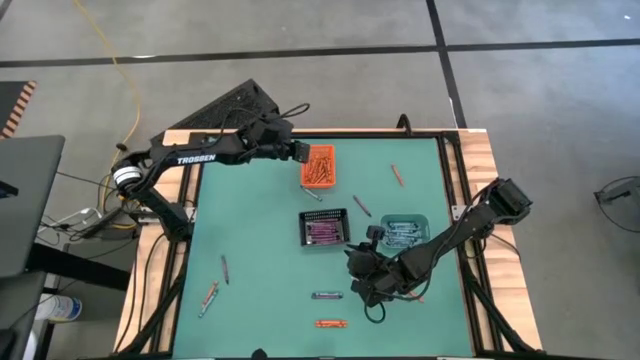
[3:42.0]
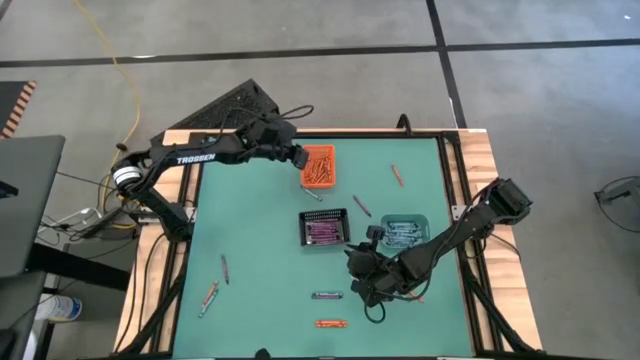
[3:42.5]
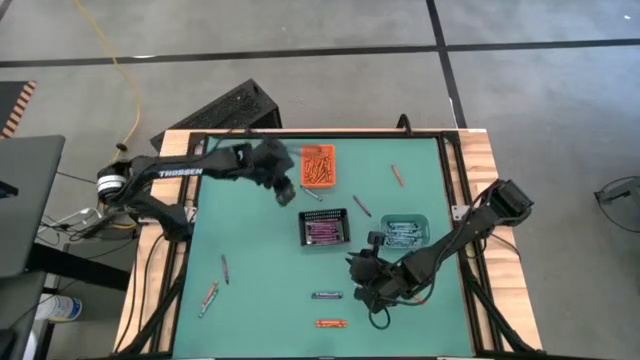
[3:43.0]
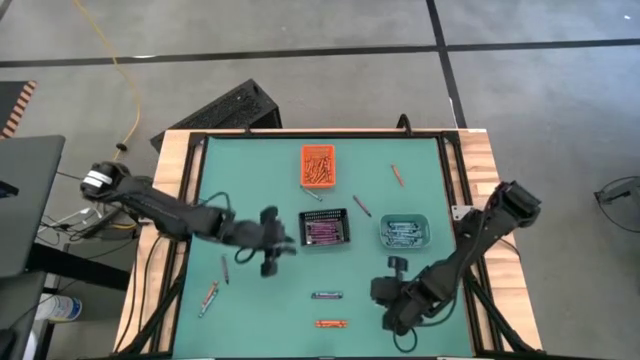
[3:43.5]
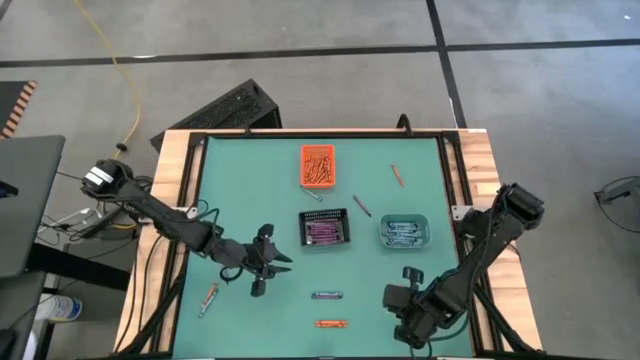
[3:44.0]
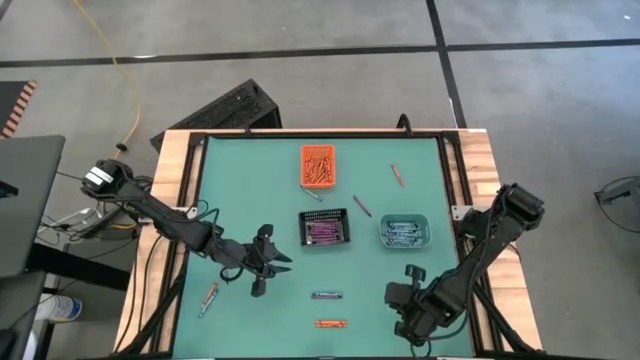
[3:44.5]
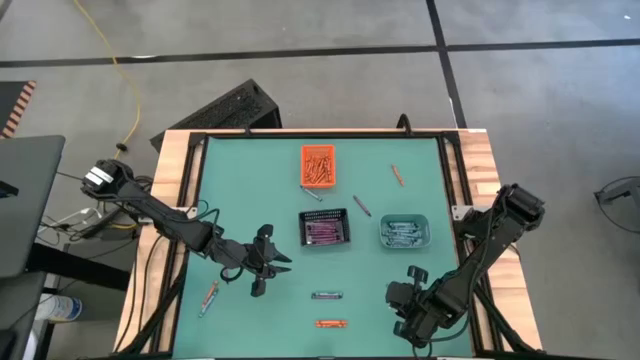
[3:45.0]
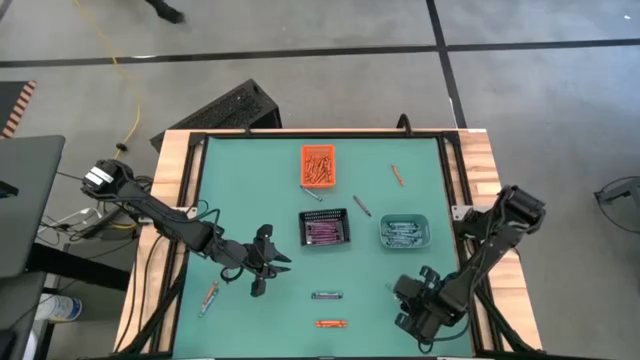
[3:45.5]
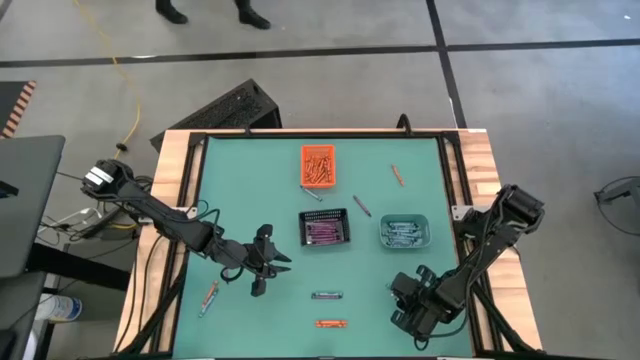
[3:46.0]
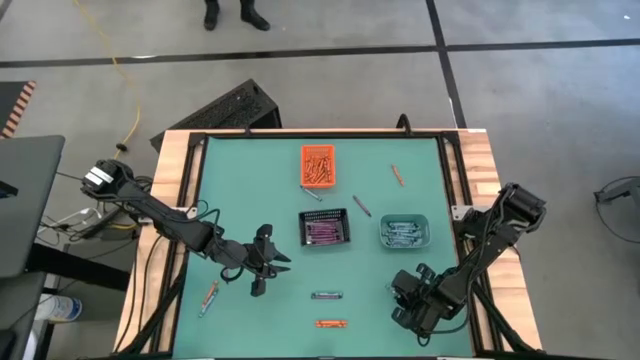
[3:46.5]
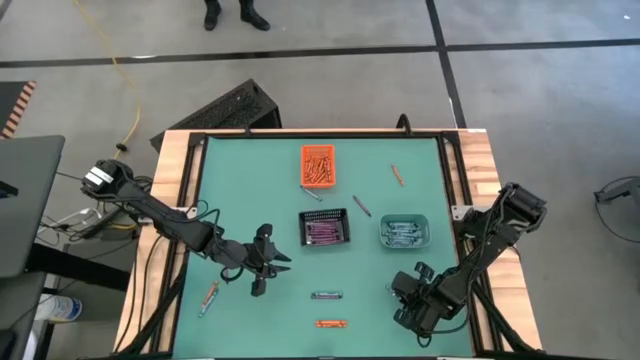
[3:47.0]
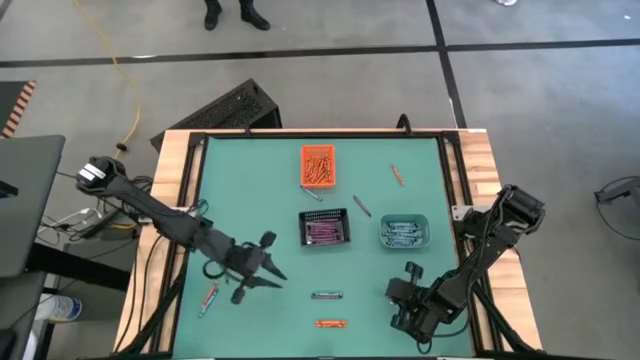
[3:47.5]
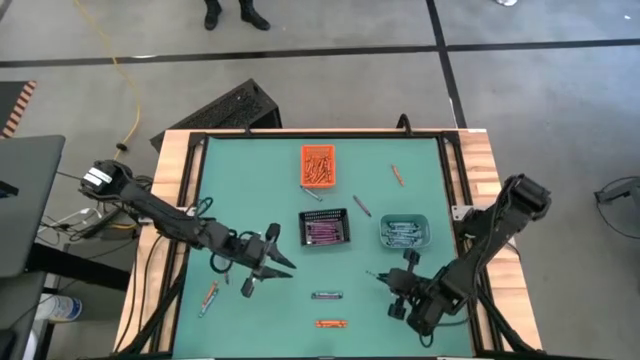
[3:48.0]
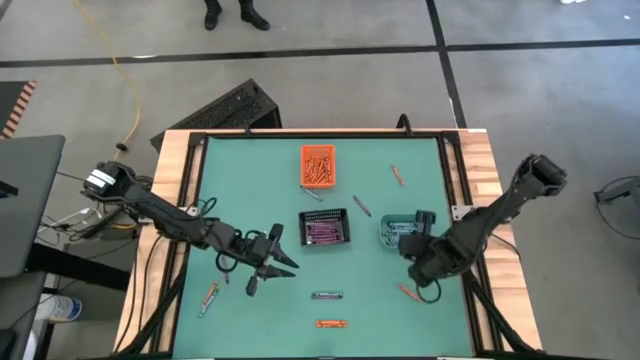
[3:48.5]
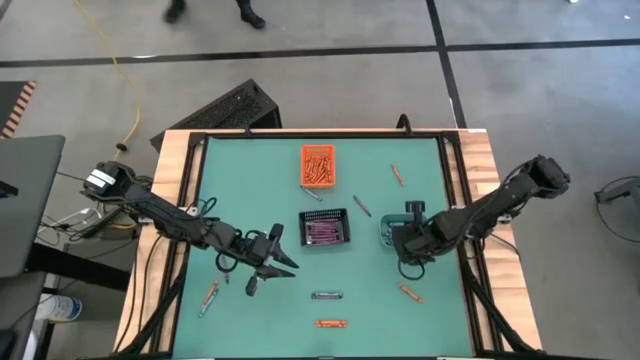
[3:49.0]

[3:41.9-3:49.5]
Task: Sort crayons
Put the blue crayon into the green bin

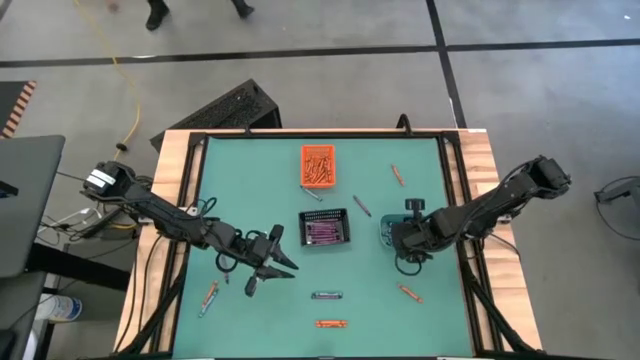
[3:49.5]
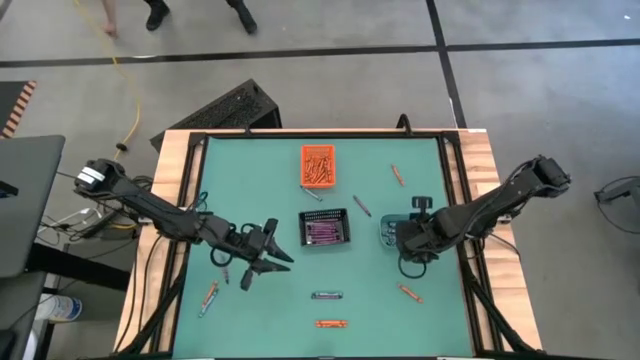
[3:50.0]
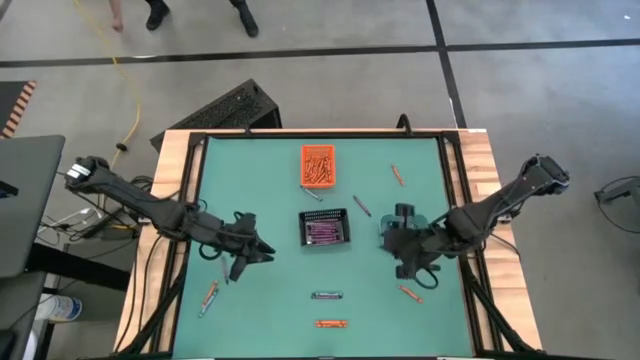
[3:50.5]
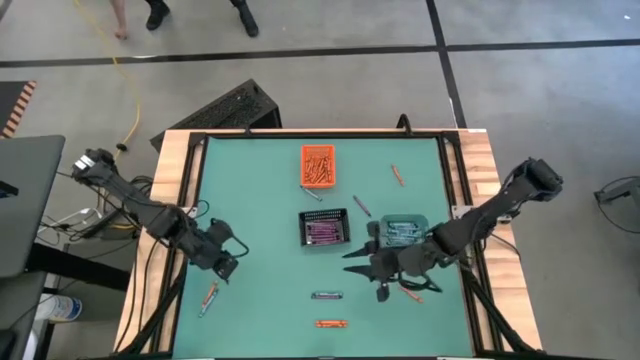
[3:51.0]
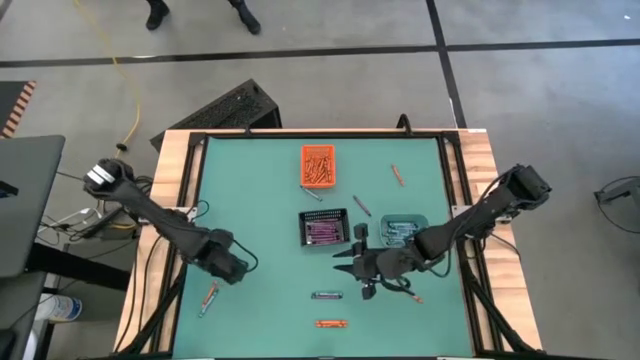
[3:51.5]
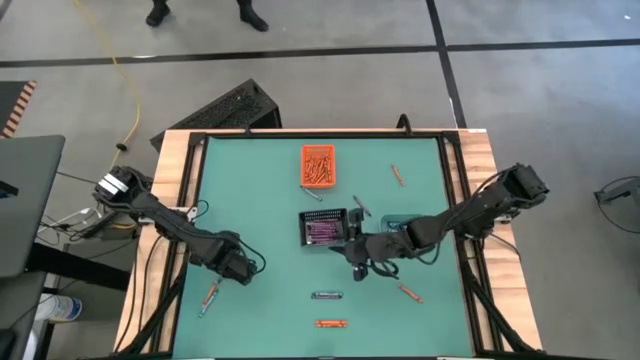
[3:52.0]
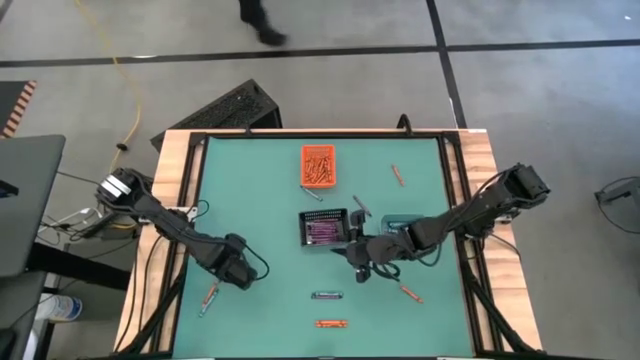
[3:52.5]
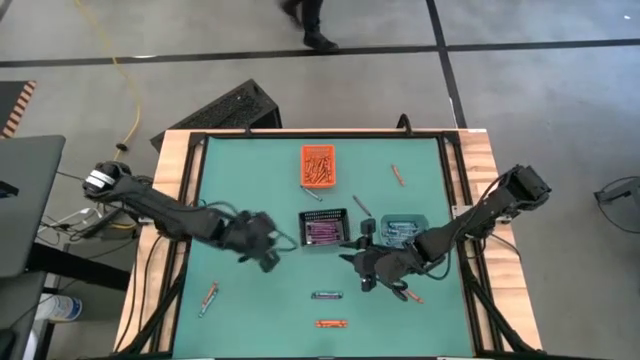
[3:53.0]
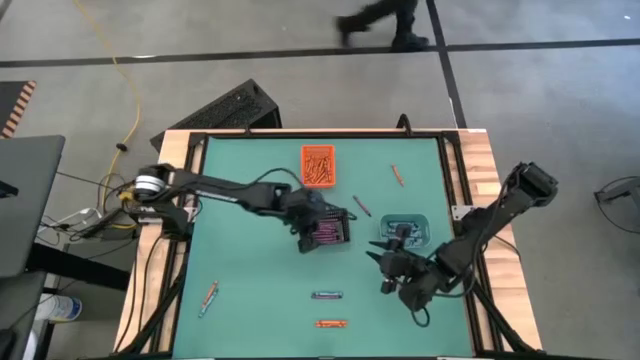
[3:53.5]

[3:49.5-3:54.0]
Put the violet crayon into the black bin

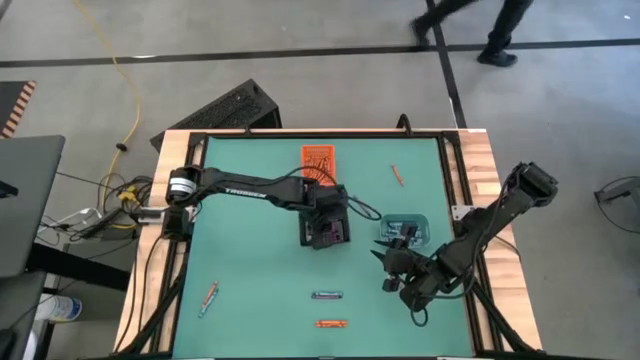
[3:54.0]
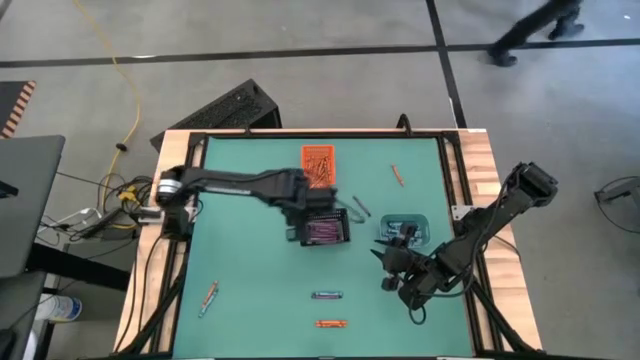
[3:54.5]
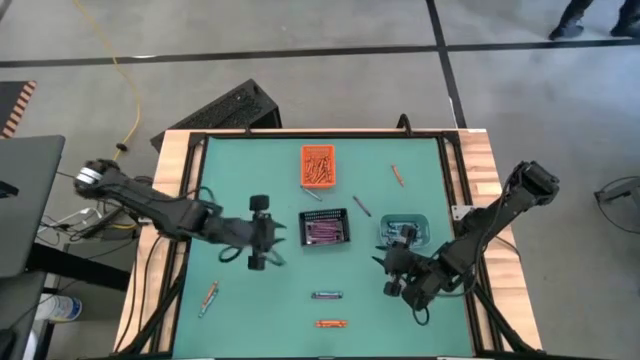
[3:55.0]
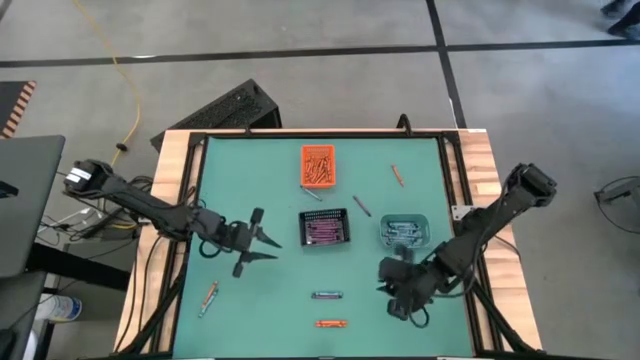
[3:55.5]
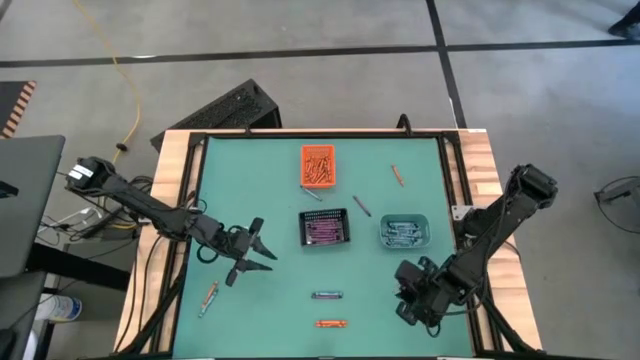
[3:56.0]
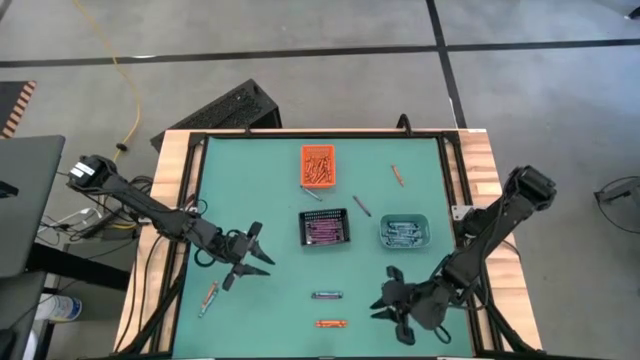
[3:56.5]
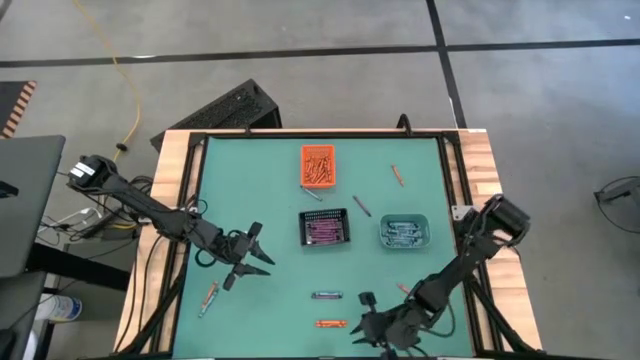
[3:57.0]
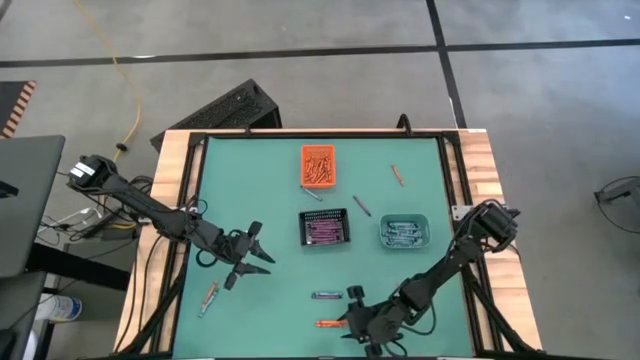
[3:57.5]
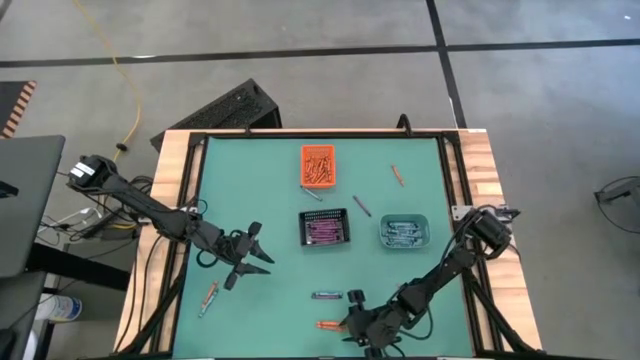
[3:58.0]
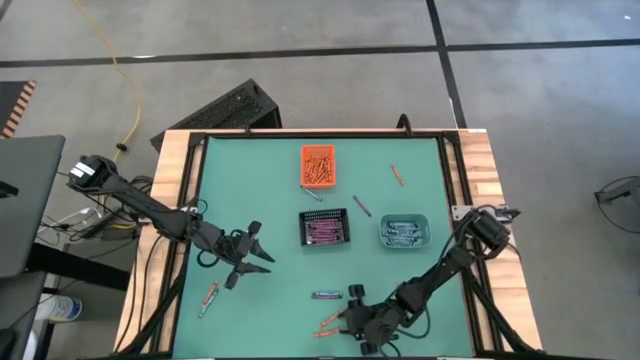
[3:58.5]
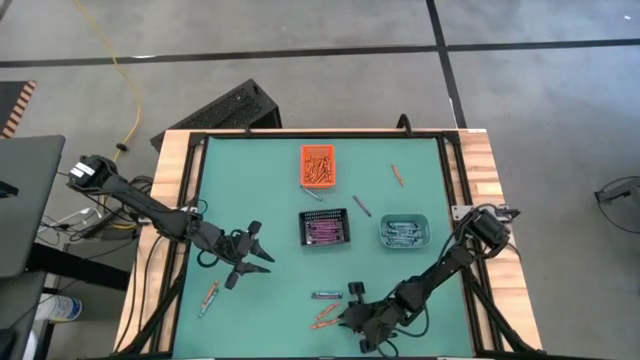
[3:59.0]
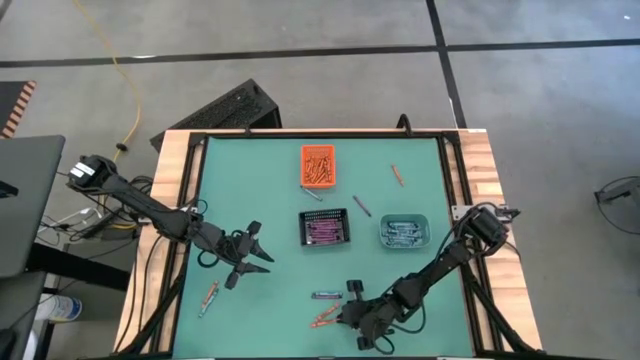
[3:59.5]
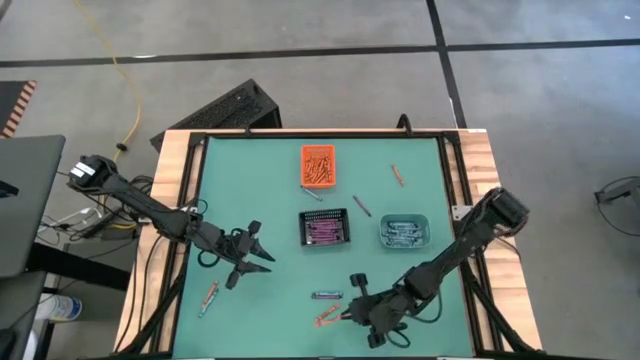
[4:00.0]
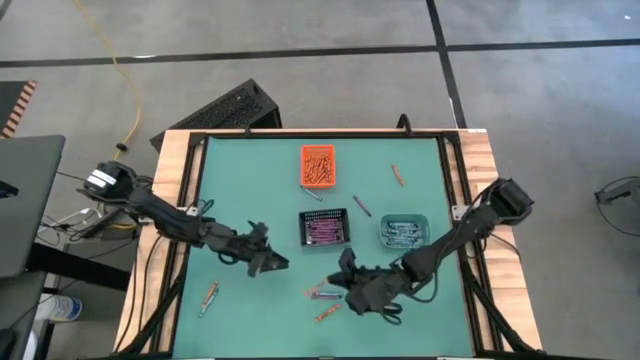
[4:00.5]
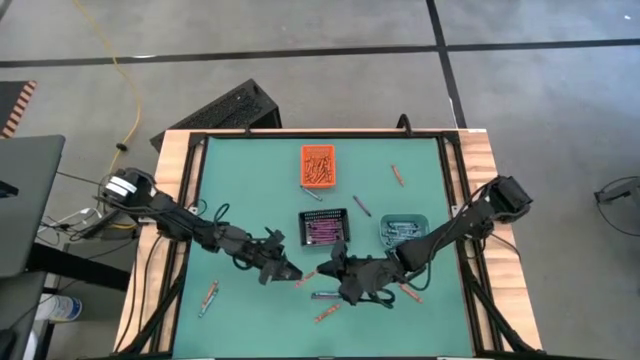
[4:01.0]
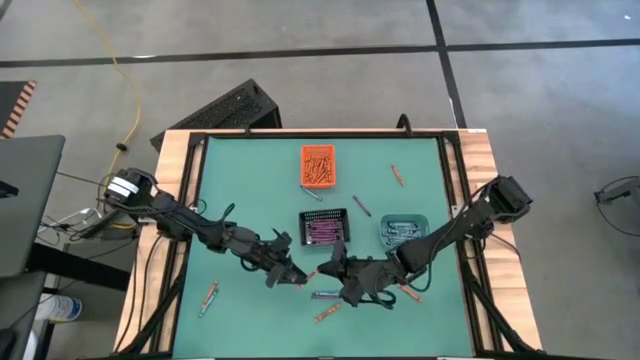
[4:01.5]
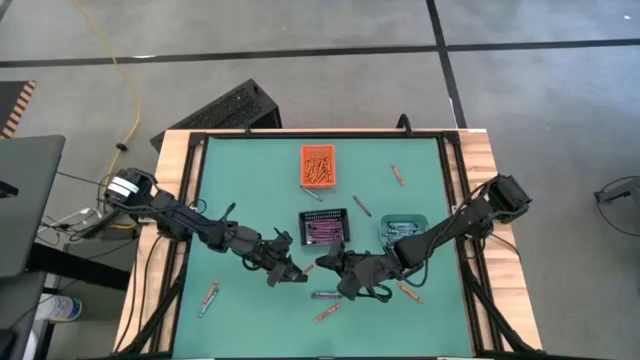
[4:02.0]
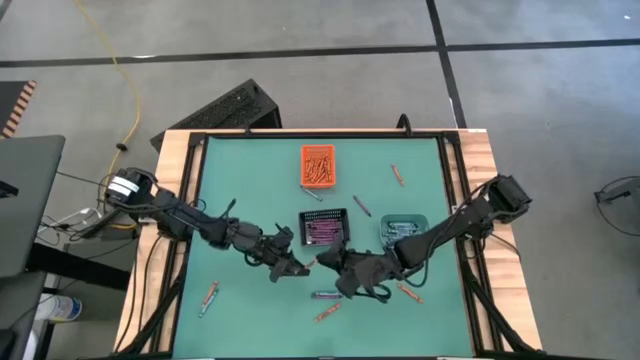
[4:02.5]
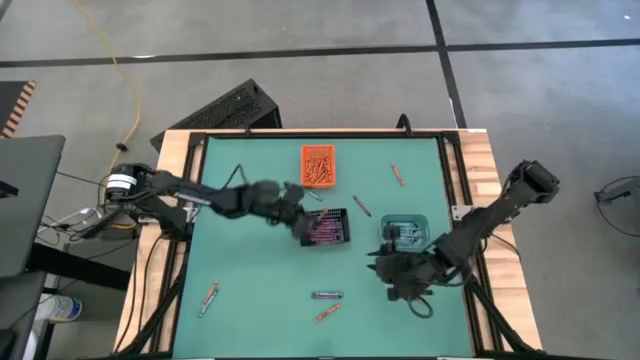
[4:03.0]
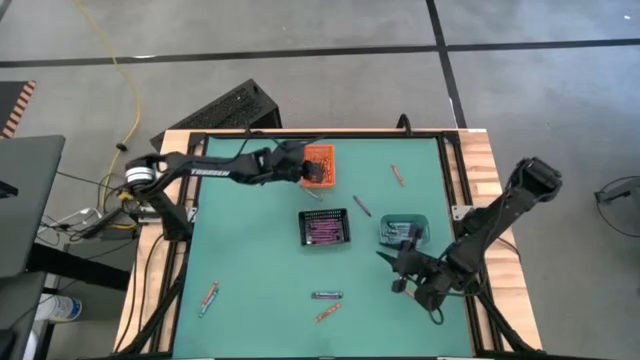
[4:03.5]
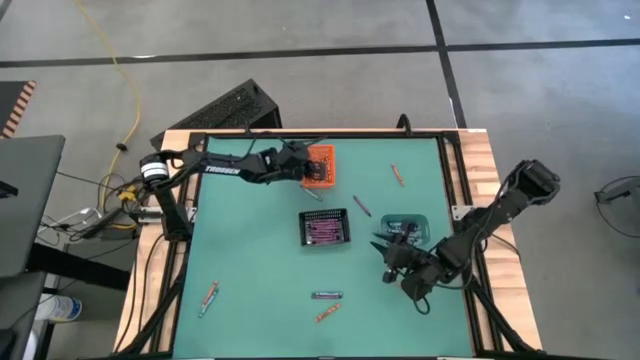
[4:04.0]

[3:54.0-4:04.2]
Put the orange crayon into the orange bin
